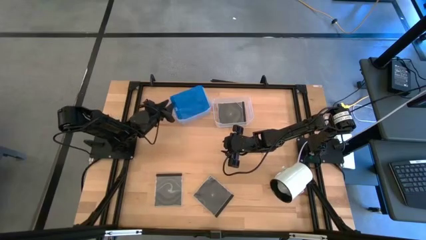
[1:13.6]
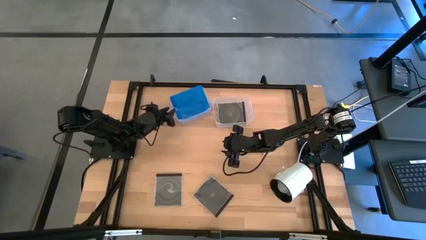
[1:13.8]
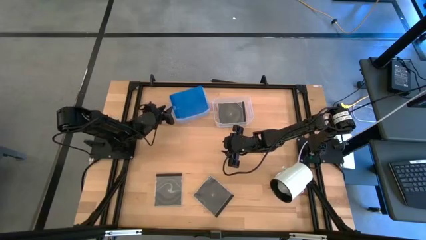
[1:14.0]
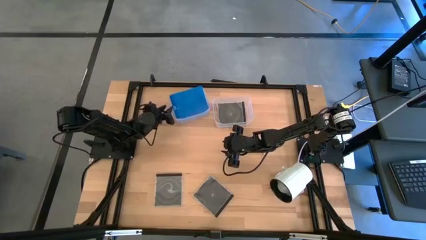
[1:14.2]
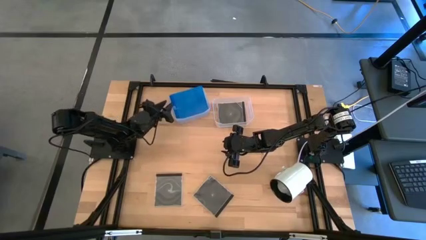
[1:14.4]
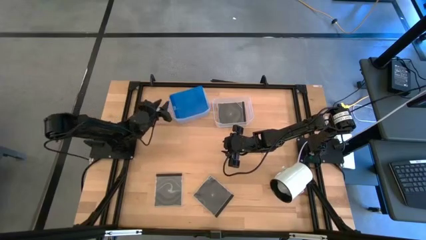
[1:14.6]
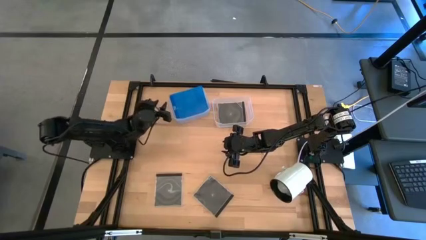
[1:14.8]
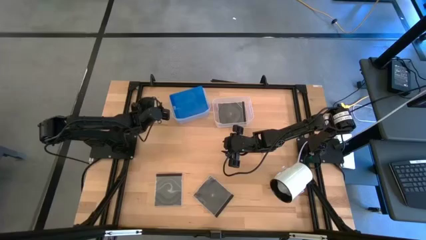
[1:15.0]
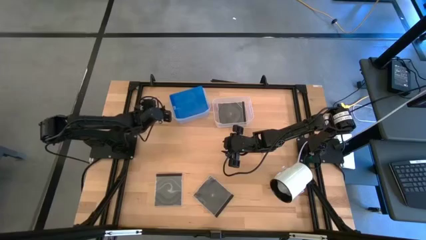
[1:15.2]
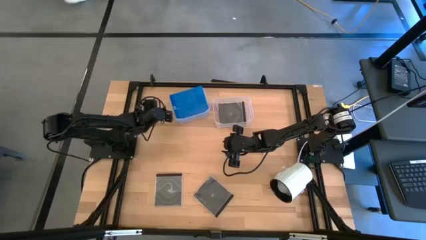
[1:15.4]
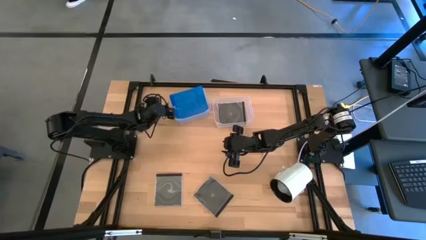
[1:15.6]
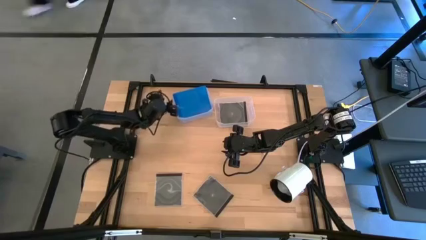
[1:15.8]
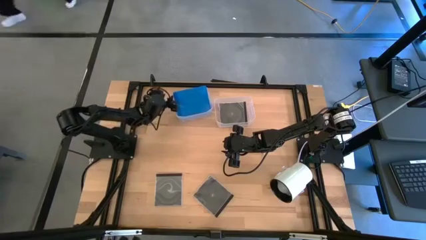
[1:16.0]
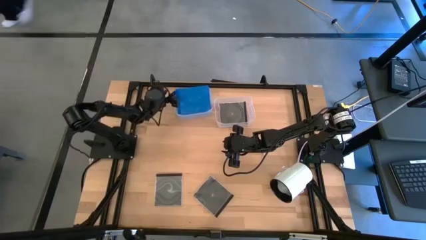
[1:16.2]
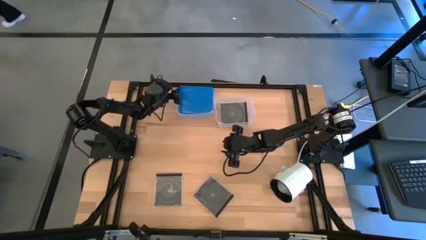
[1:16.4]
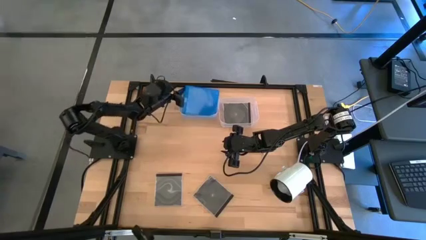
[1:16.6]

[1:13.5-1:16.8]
Task: Pick & place jewel cases by type
Adjust the left transparent bin on the shelf

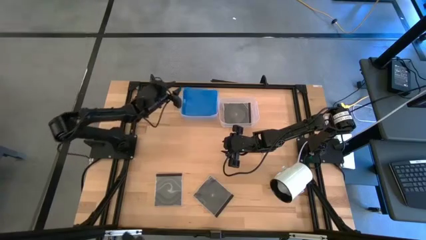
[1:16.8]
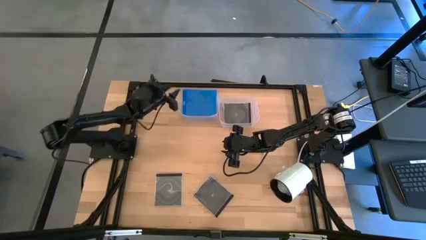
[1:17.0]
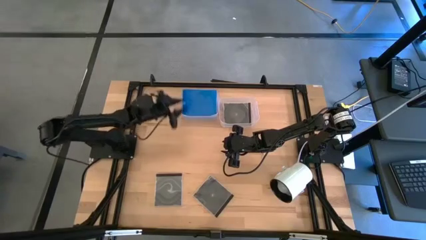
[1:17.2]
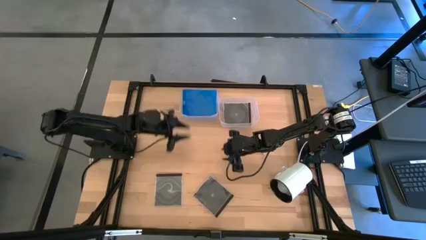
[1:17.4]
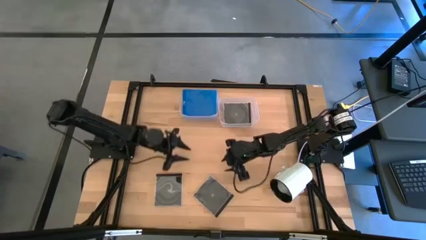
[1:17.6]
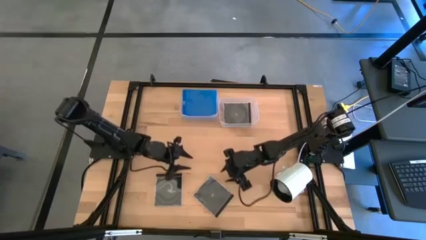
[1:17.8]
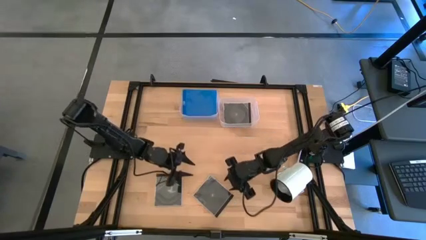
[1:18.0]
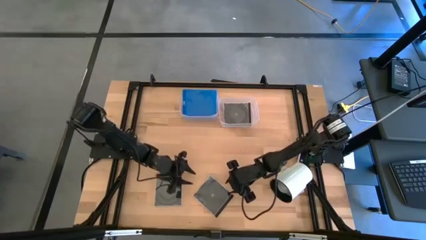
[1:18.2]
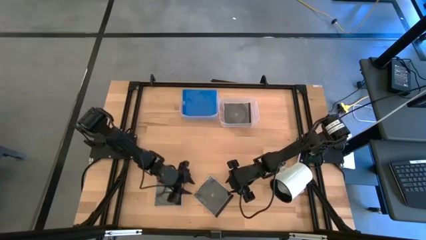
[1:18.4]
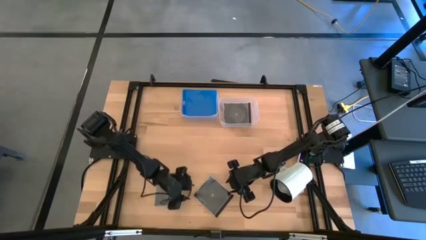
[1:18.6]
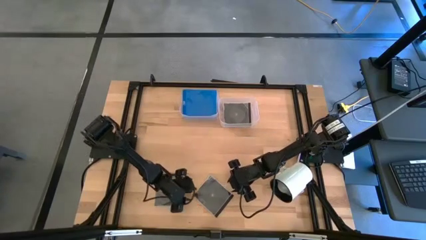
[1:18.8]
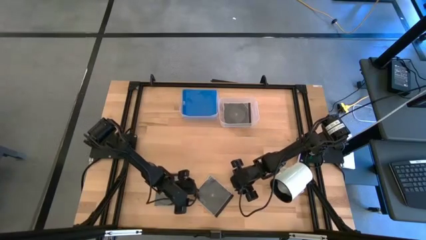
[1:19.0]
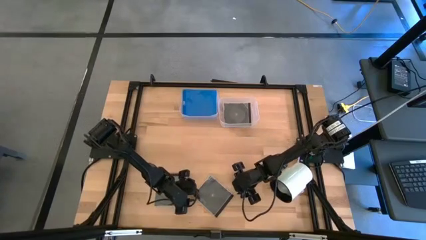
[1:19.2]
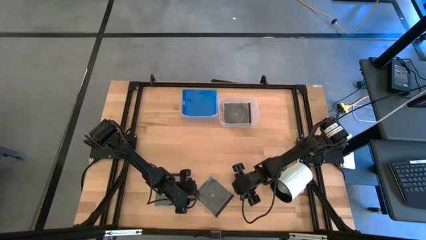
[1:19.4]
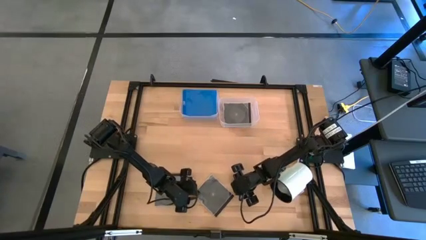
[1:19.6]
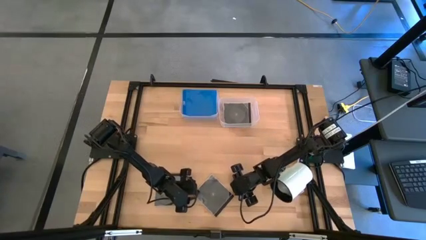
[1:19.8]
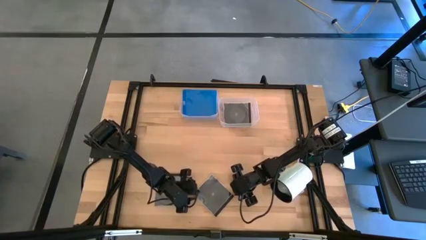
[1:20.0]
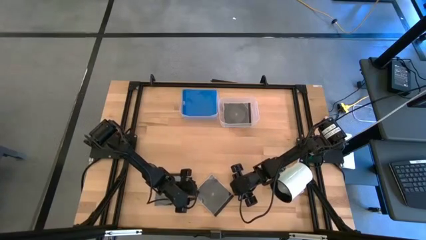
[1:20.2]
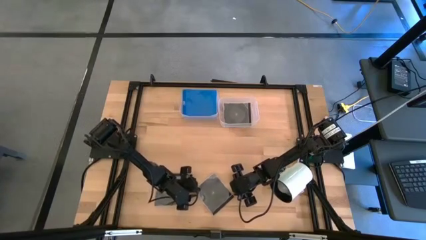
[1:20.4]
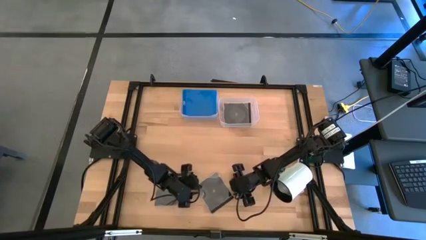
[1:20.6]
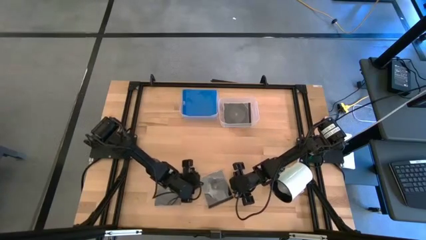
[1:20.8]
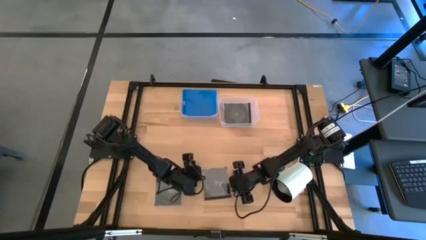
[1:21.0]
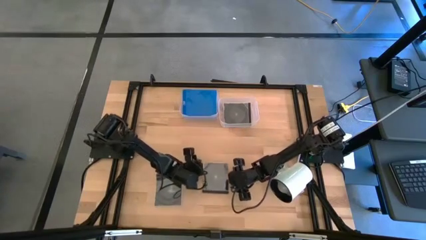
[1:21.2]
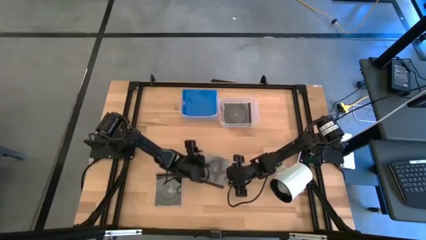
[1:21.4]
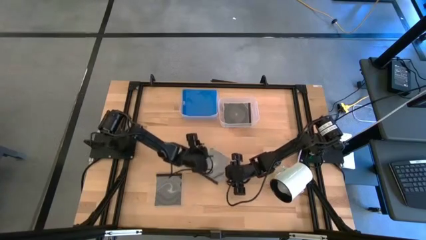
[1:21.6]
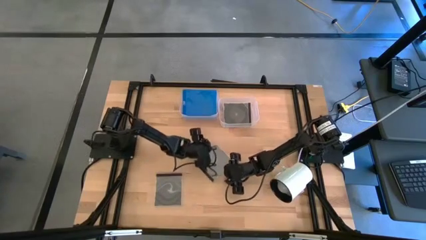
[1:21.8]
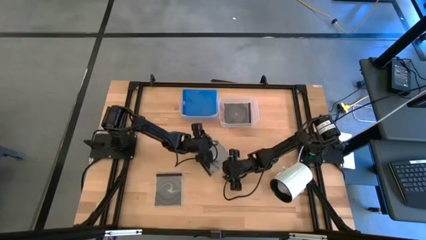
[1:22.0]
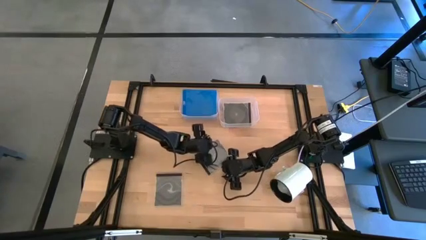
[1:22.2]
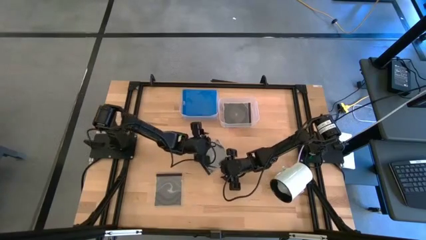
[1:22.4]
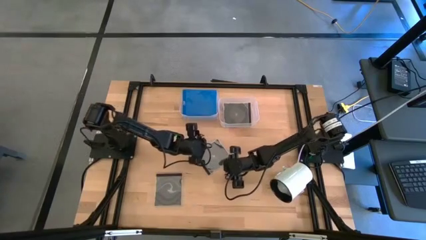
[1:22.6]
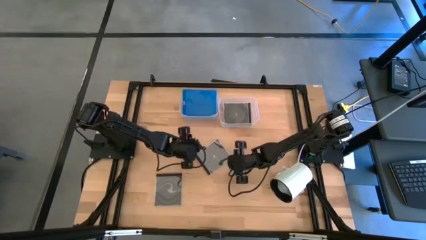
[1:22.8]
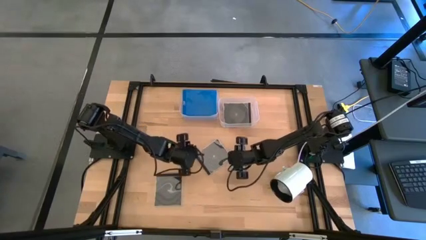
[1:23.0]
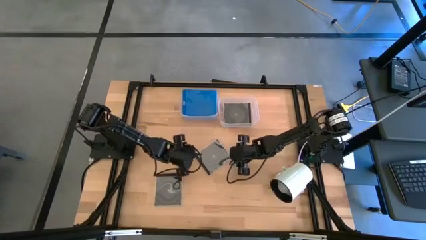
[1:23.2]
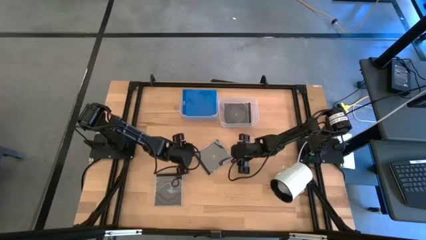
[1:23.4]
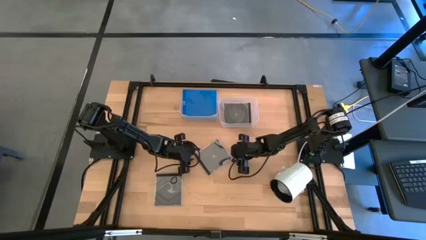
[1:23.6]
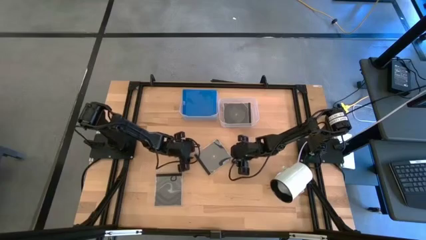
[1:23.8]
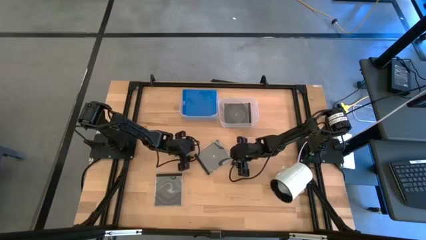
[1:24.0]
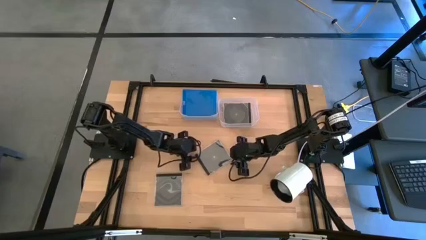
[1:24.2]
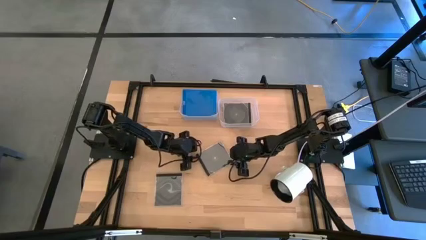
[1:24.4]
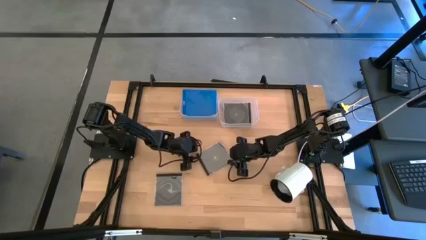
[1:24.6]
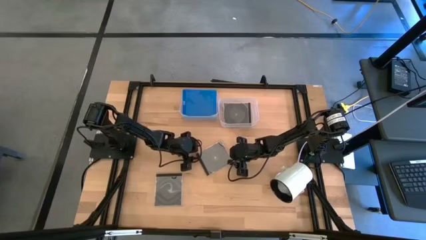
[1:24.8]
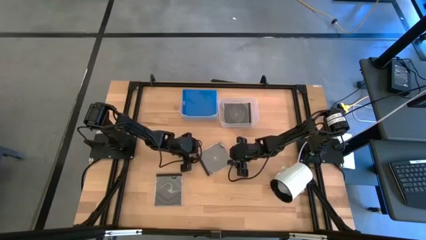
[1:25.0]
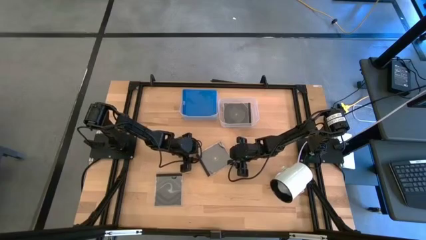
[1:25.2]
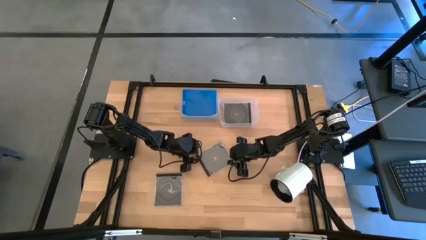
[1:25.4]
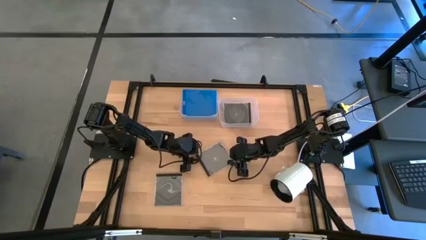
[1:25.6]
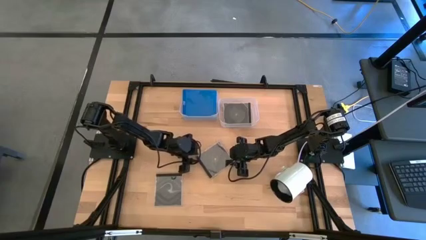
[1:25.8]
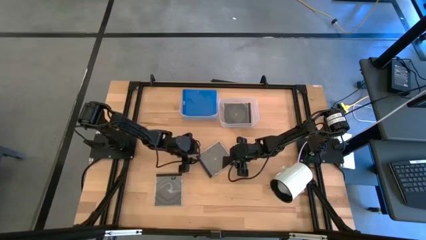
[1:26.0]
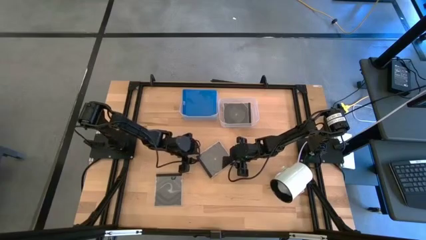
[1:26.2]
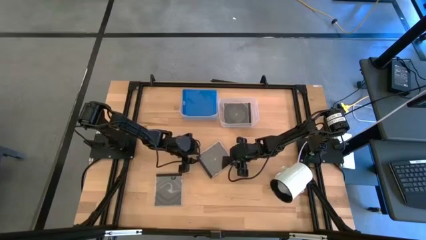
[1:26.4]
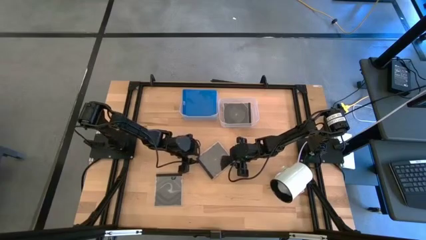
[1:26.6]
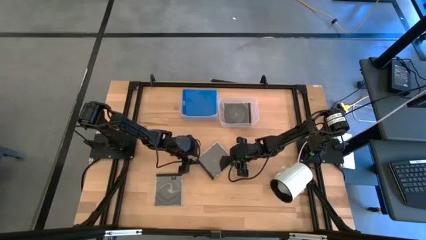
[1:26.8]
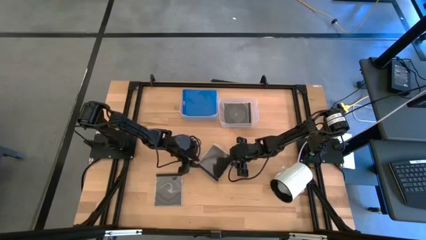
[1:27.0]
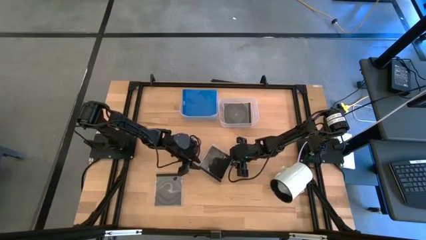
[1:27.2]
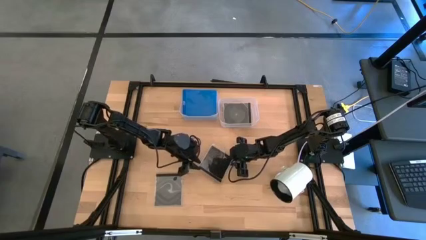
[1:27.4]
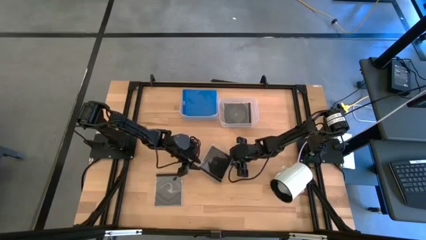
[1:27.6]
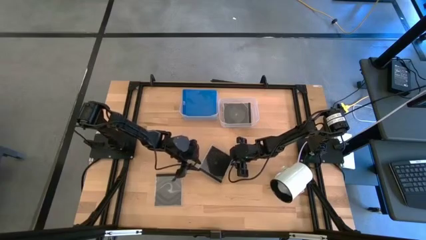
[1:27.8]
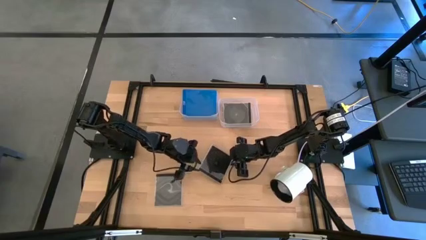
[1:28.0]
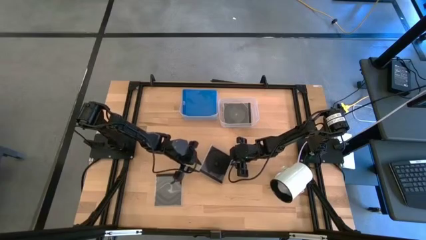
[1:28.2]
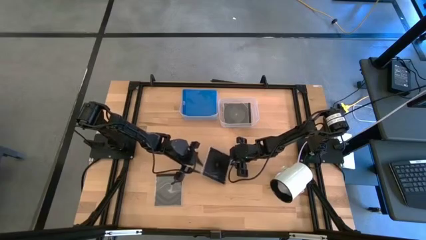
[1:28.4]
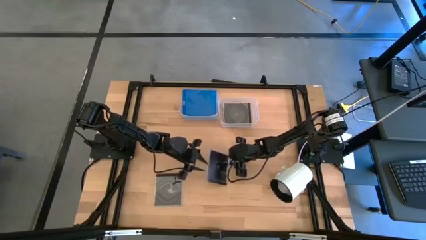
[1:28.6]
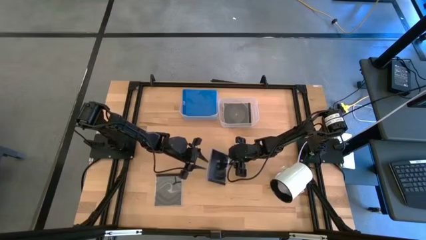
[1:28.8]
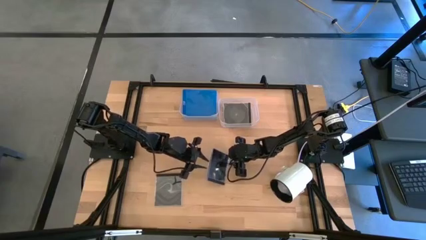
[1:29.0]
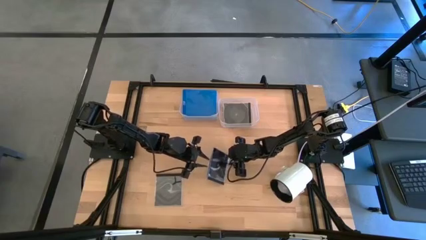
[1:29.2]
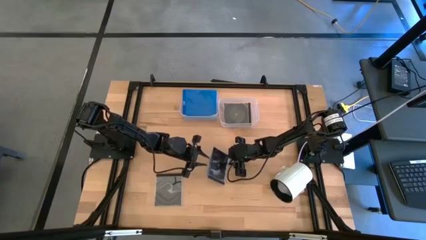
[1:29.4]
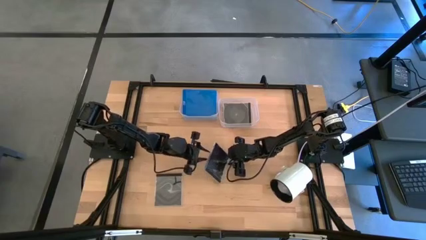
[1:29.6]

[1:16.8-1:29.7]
Put the right black CD case into the transparent bin
